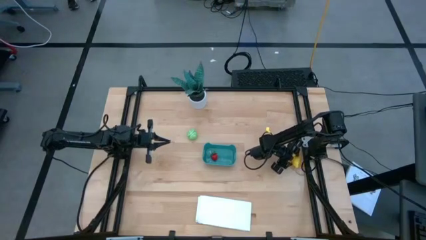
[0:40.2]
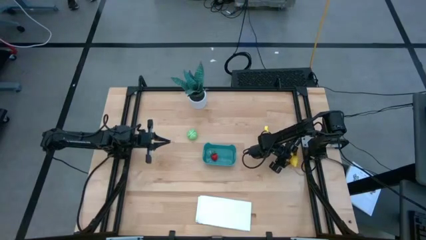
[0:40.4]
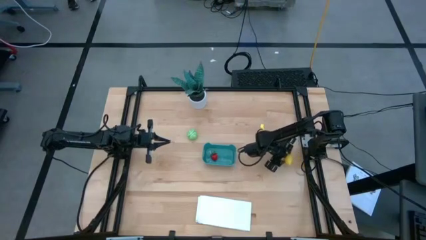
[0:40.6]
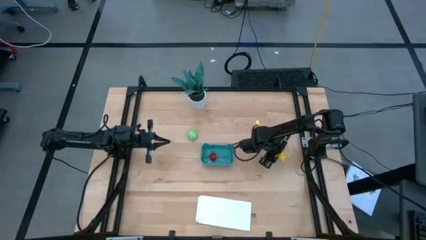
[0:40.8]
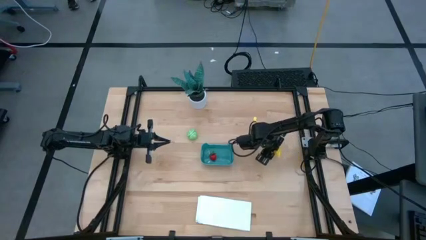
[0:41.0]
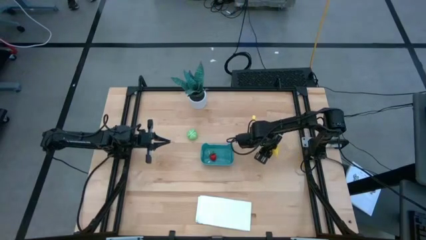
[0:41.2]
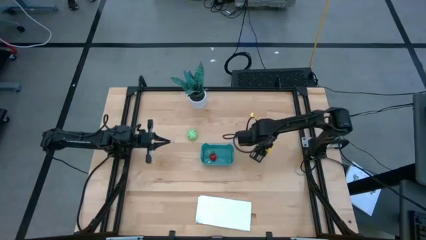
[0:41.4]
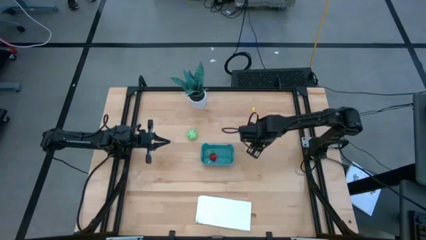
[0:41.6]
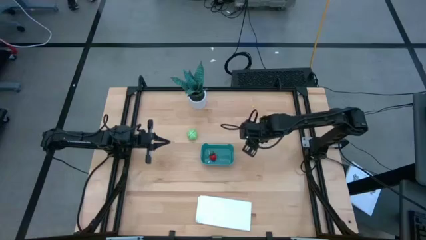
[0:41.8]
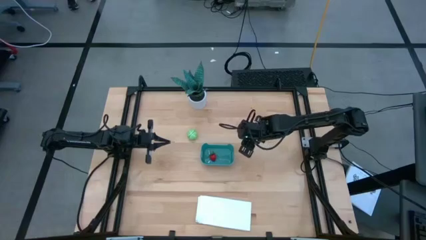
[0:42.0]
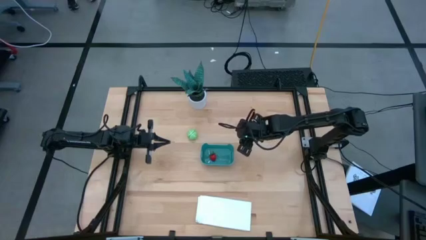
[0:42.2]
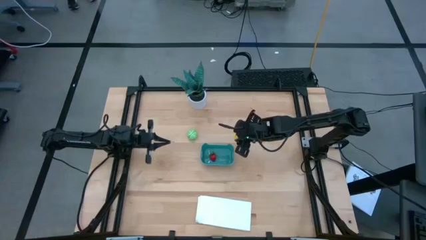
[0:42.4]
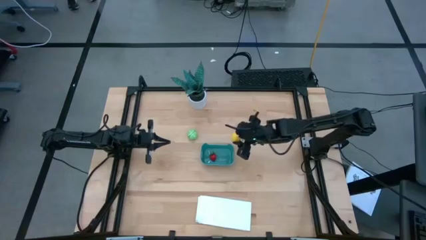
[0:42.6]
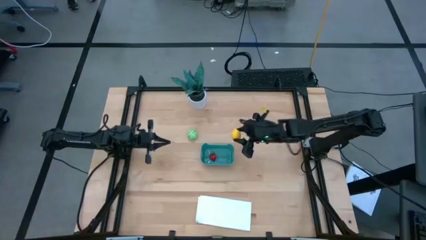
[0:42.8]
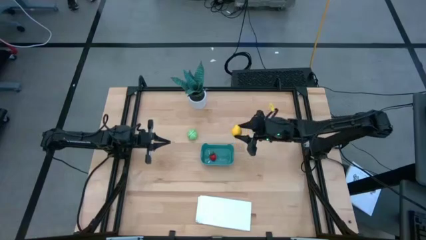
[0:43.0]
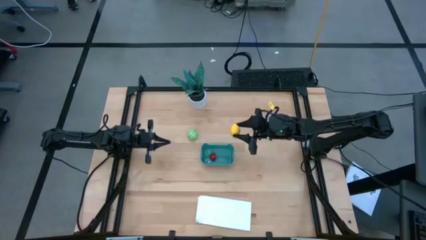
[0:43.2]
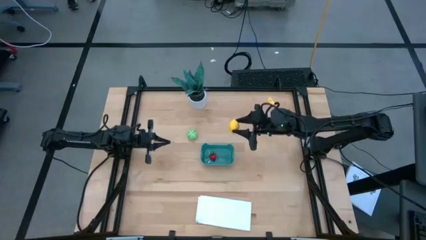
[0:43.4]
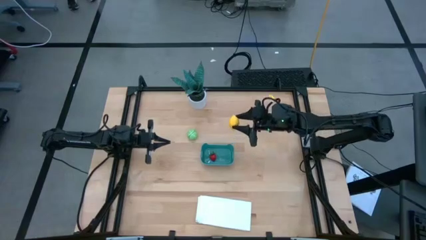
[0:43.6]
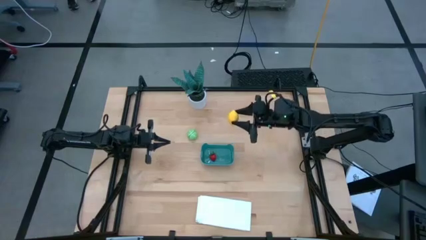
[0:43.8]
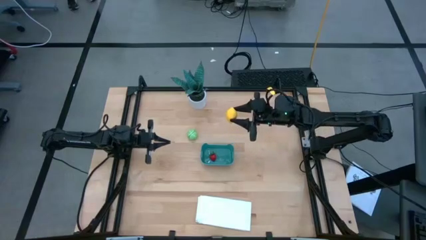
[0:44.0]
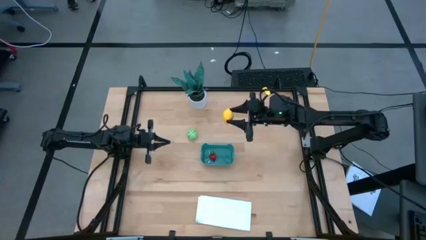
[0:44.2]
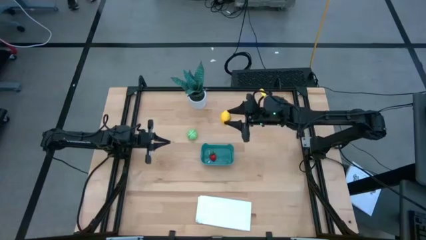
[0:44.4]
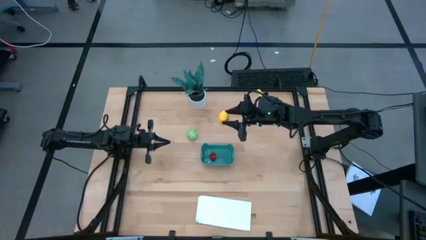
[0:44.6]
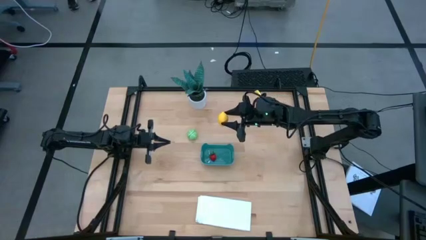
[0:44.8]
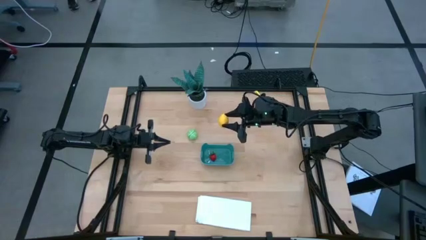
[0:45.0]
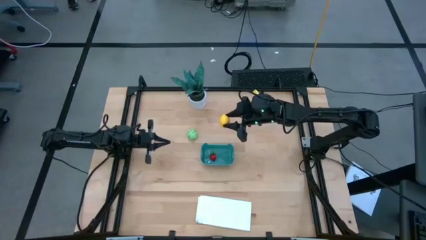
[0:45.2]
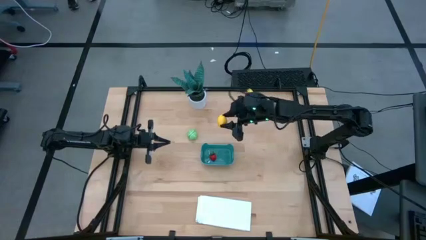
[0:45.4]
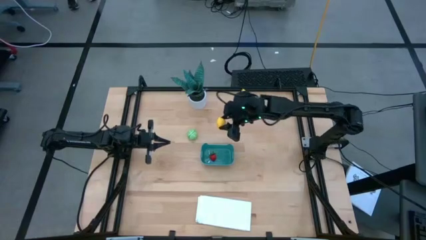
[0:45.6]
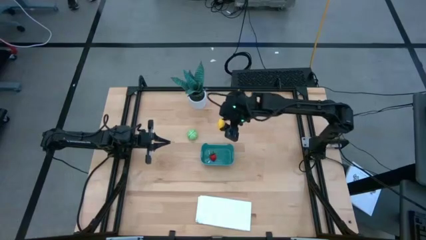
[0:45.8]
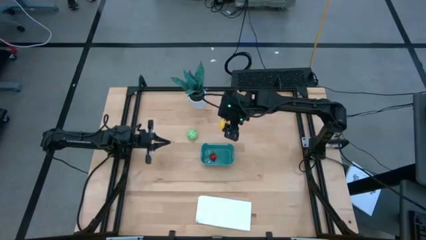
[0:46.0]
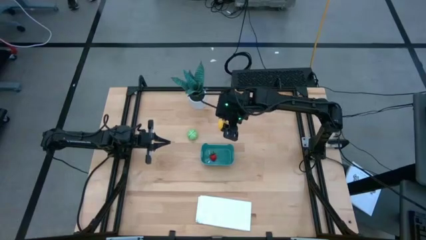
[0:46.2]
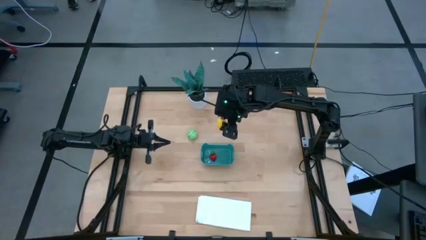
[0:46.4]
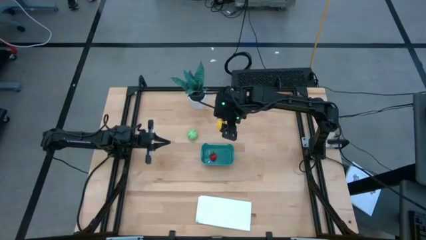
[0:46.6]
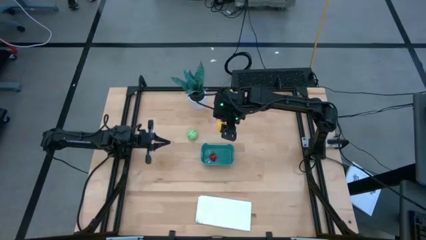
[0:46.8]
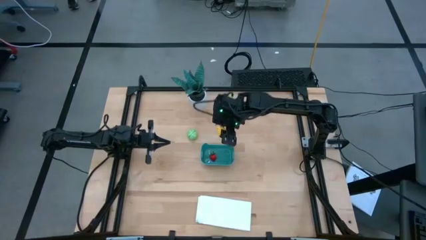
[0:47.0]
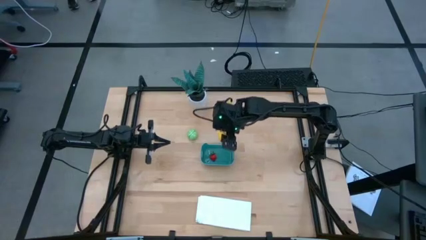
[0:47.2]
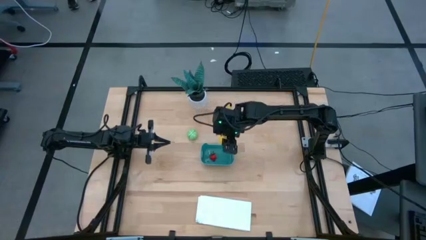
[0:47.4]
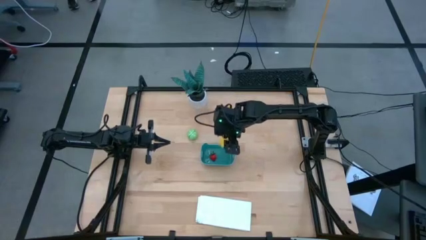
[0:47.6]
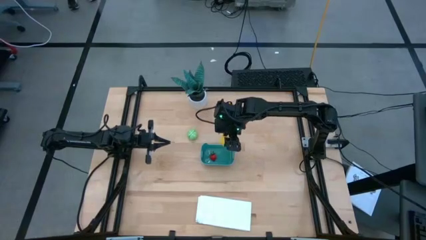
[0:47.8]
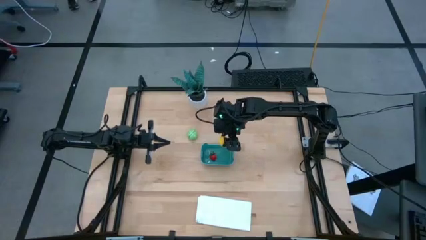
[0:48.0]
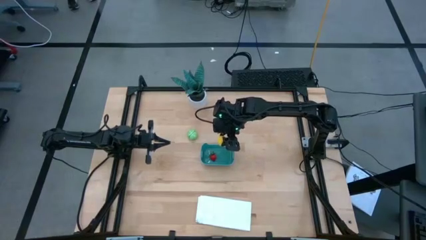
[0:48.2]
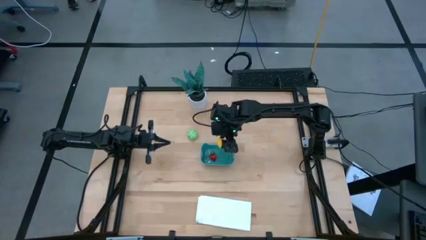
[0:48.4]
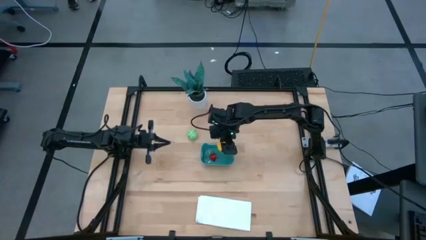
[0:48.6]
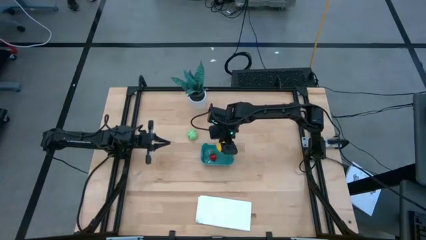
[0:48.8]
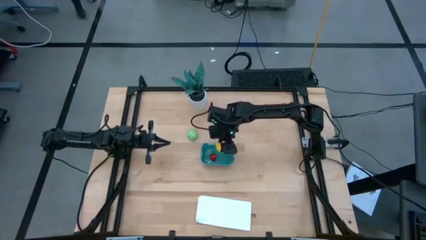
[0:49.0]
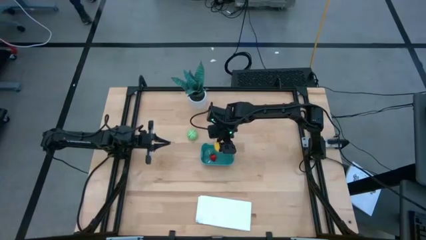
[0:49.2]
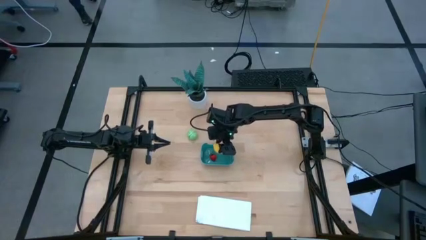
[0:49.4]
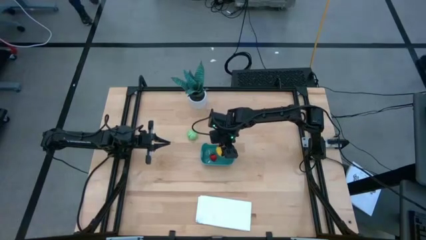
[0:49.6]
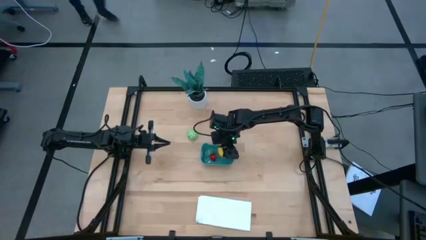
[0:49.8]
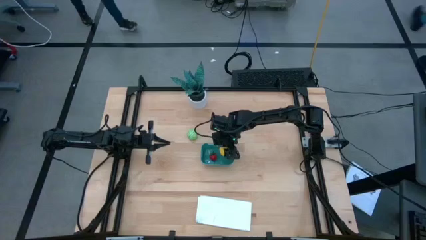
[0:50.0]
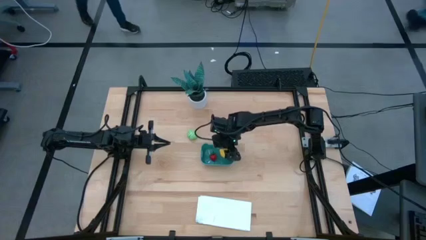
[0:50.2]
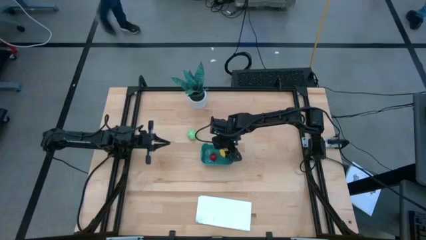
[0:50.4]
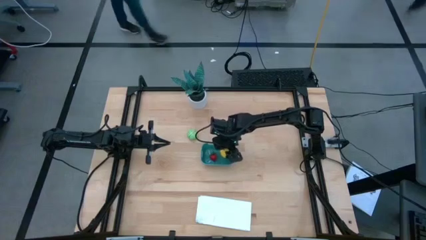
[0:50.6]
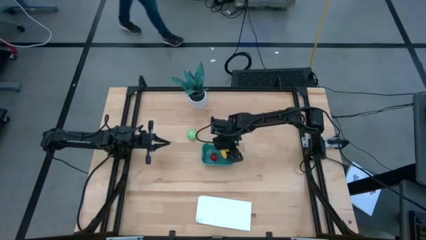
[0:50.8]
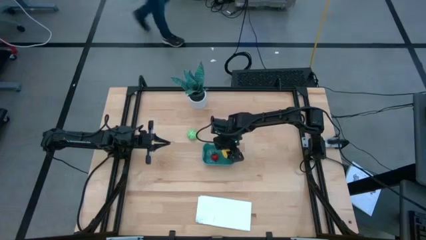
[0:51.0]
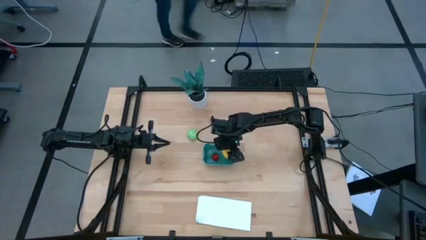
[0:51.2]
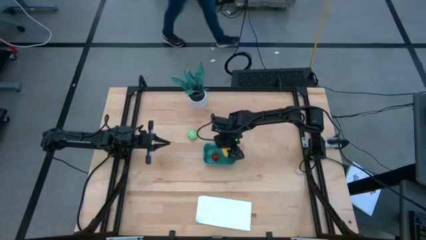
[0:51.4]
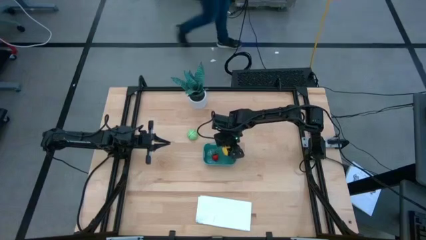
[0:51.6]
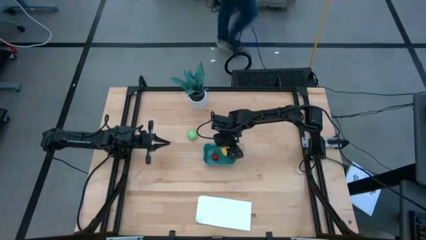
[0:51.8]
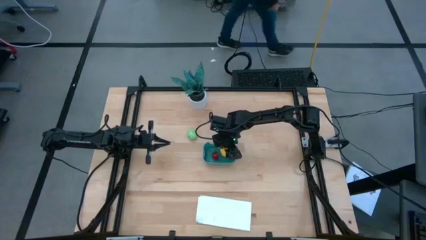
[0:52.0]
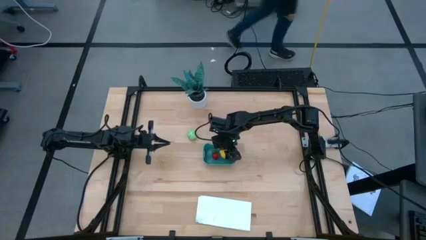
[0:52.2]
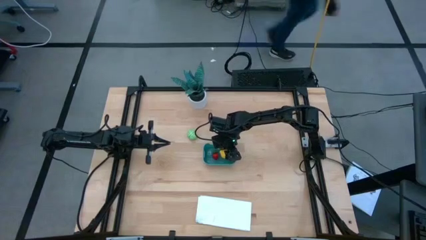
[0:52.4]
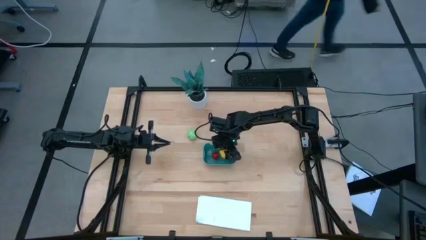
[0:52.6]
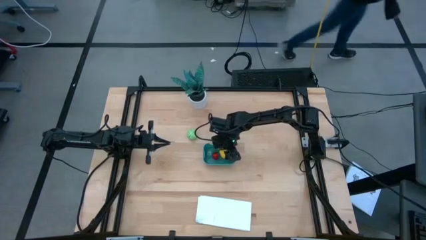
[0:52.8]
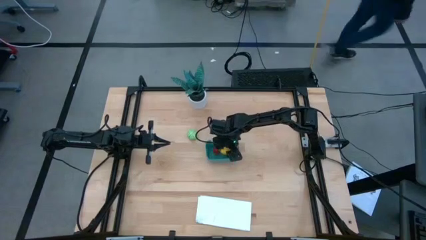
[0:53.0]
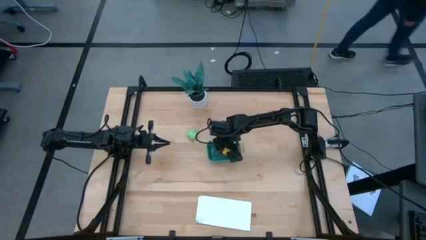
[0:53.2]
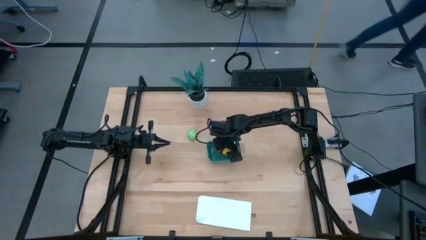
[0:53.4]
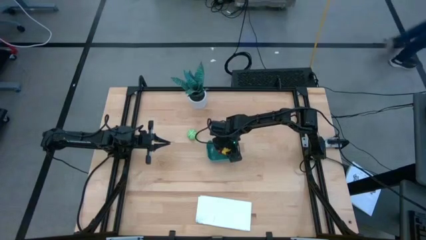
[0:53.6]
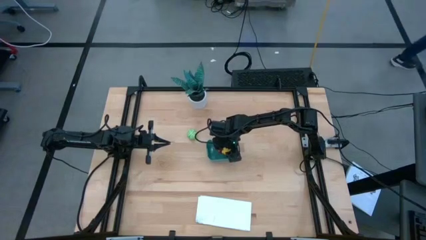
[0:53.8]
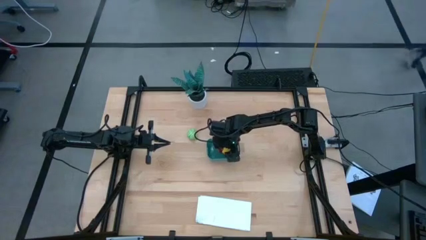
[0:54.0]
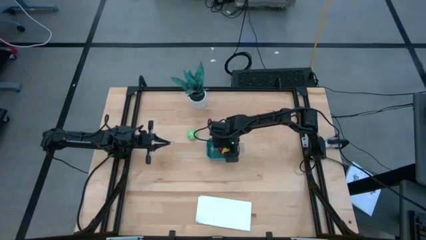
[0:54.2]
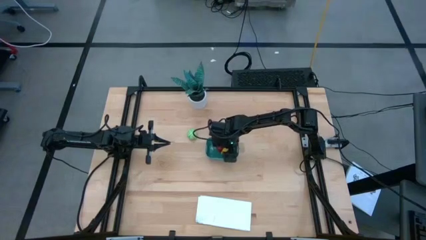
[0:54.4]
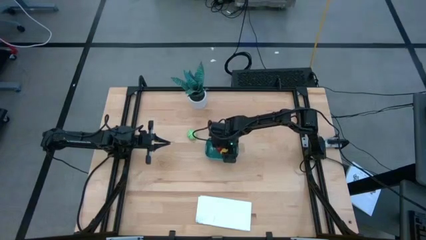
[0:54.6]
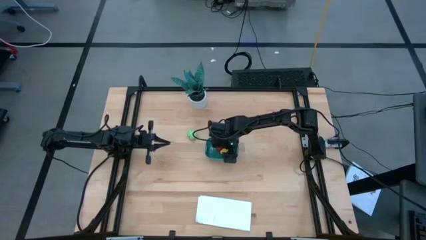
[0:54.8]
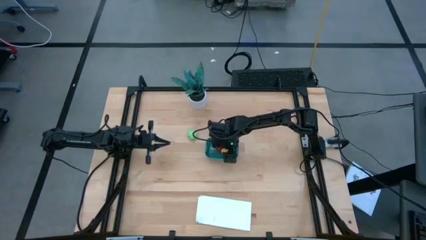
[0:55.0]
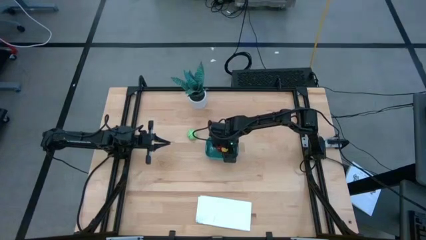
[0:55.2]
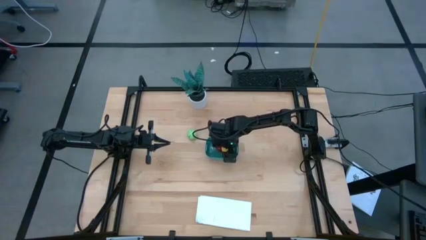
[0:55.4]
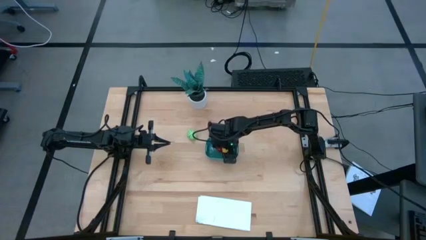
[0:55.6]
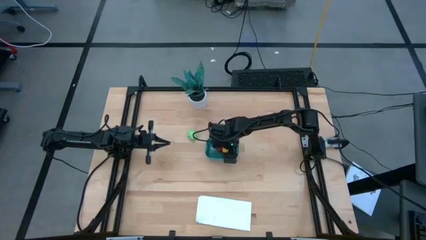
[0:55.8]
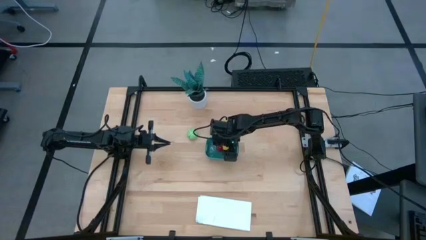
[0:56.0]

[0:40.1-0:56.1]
Task: Pick and placing Produce into tupperware
Put the yellow lemon into the blue container
